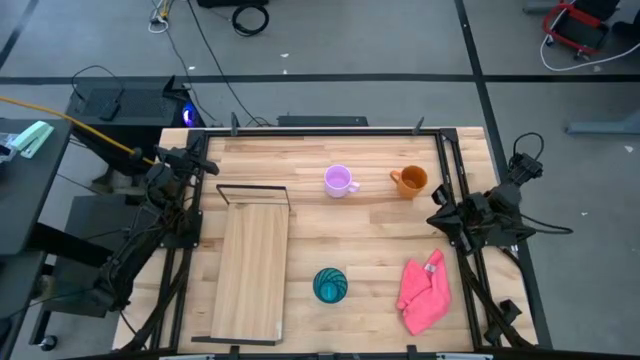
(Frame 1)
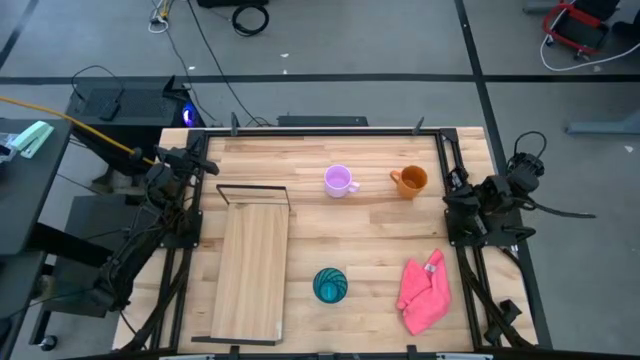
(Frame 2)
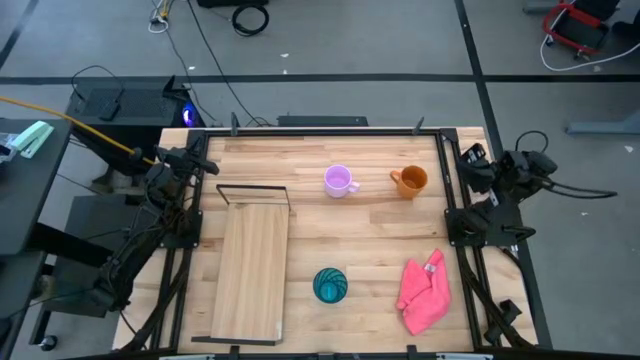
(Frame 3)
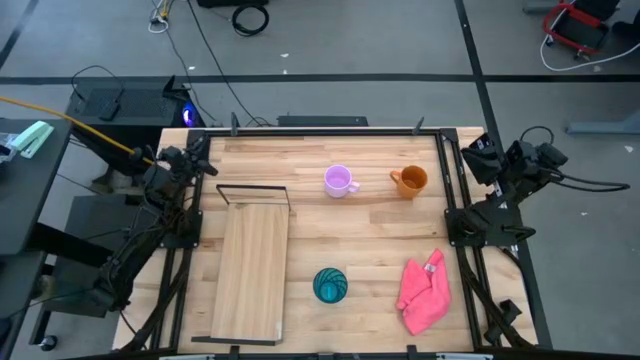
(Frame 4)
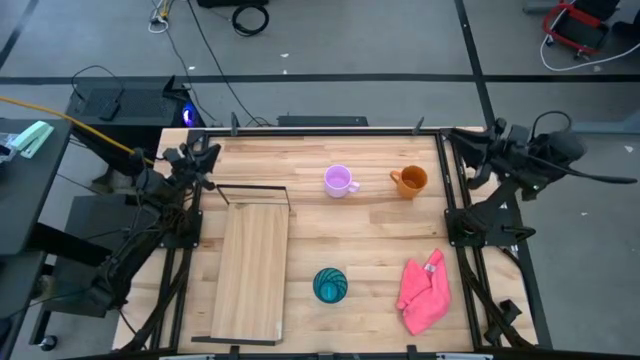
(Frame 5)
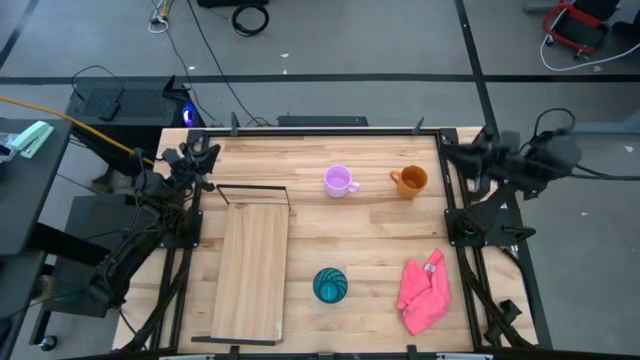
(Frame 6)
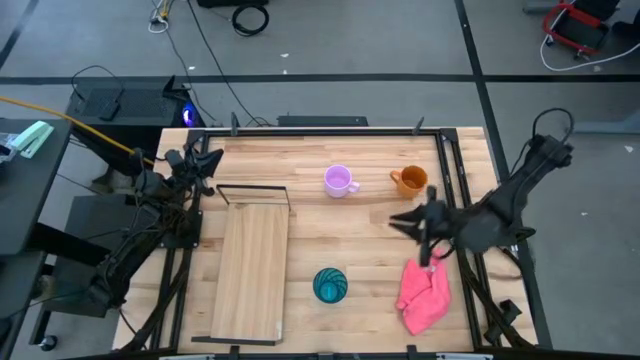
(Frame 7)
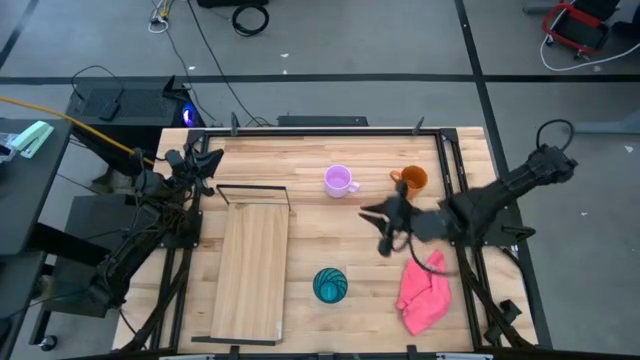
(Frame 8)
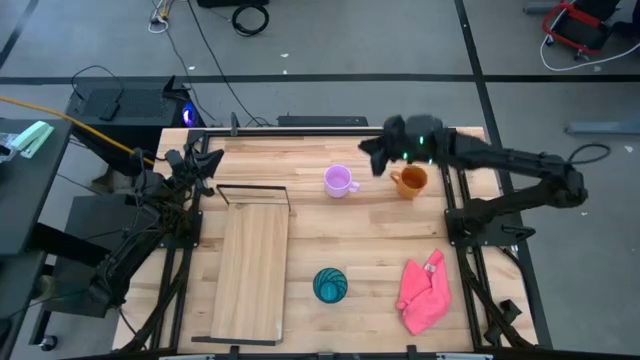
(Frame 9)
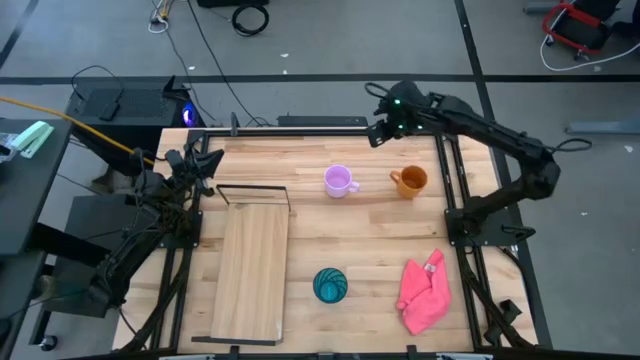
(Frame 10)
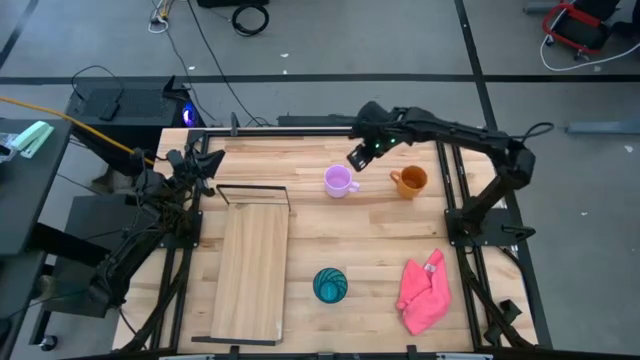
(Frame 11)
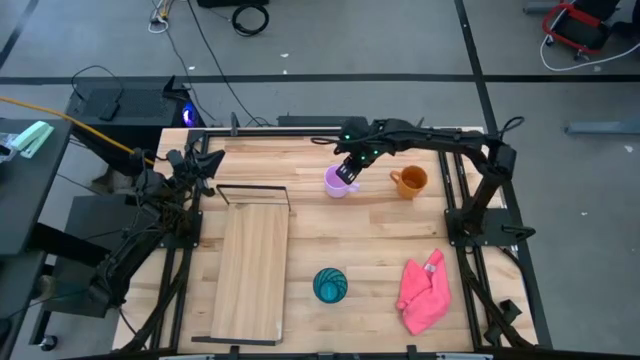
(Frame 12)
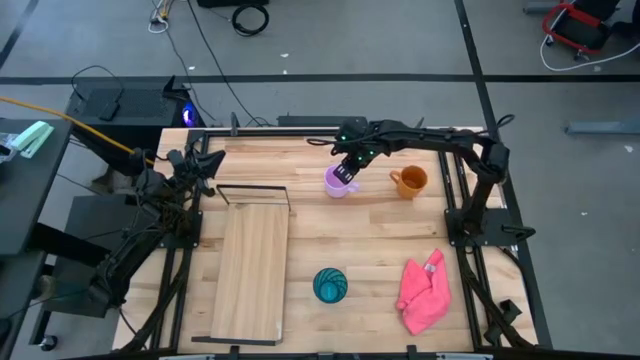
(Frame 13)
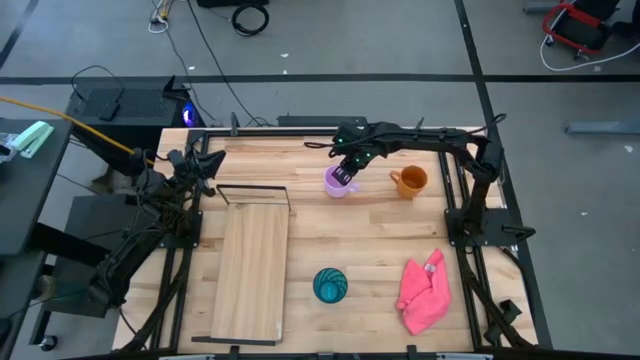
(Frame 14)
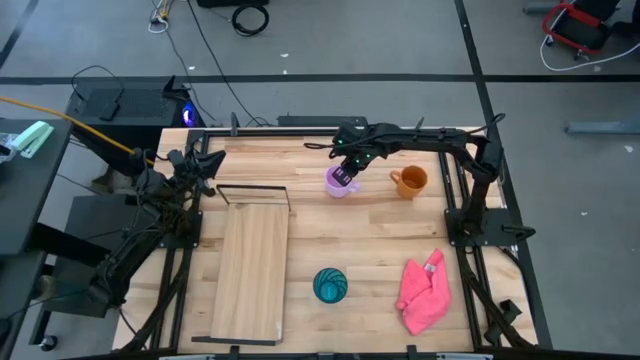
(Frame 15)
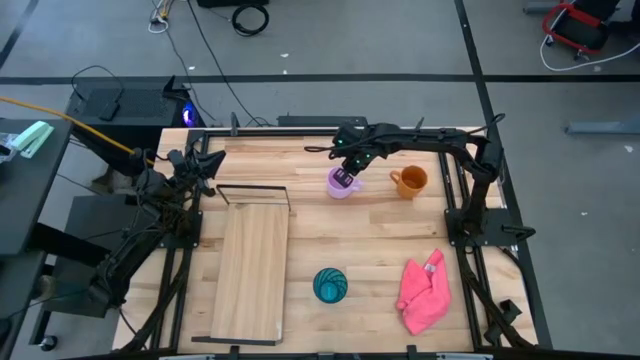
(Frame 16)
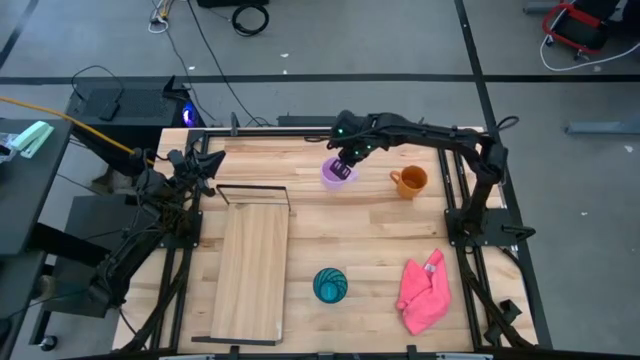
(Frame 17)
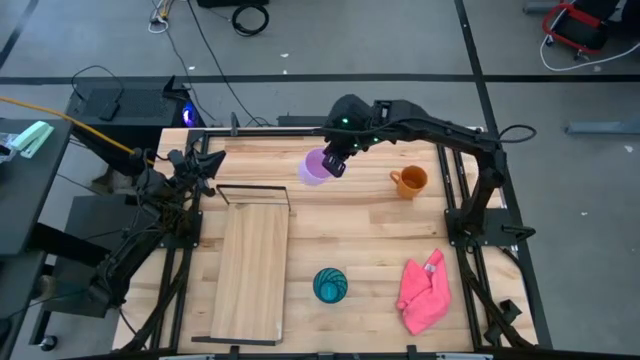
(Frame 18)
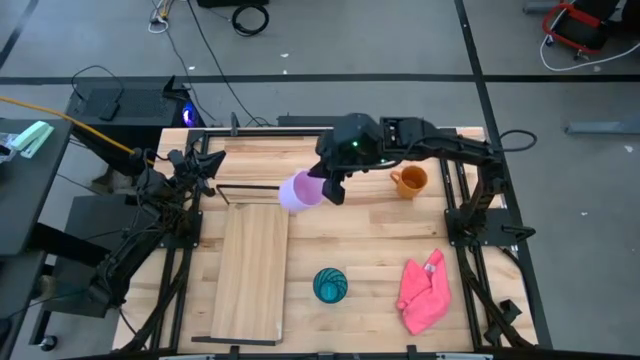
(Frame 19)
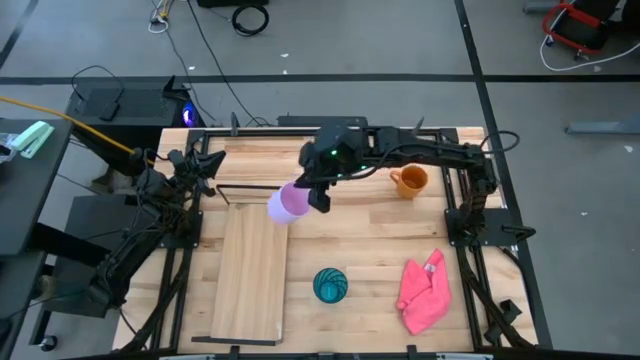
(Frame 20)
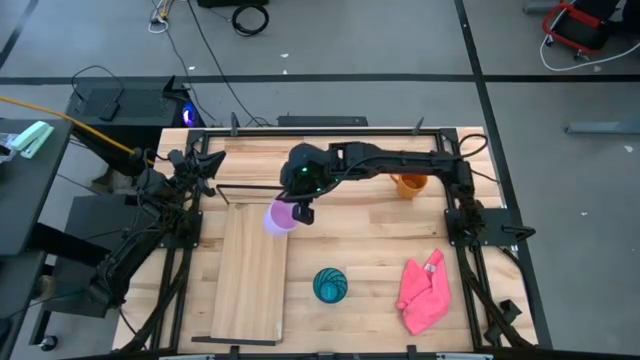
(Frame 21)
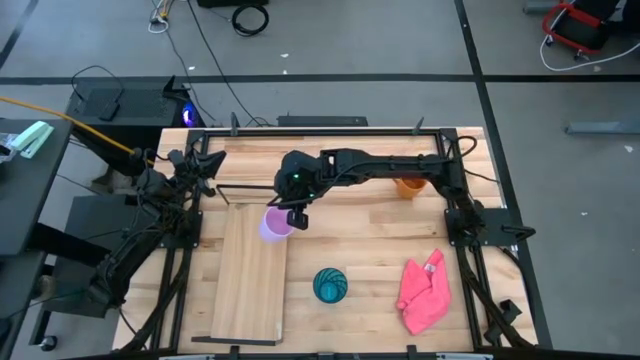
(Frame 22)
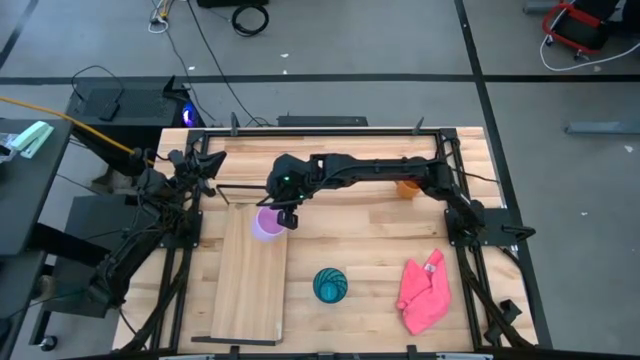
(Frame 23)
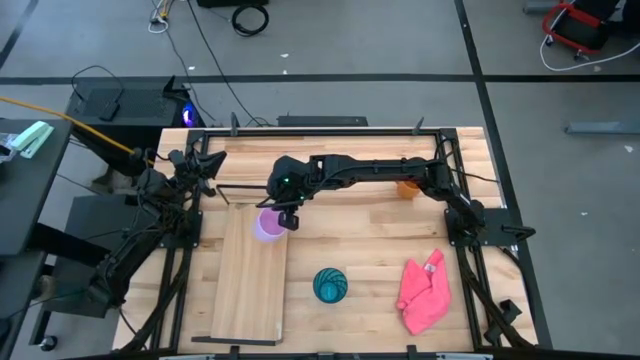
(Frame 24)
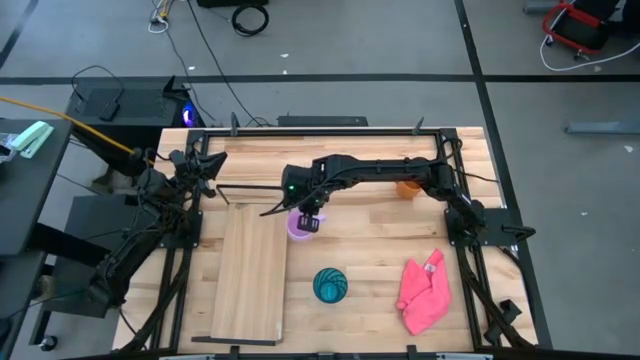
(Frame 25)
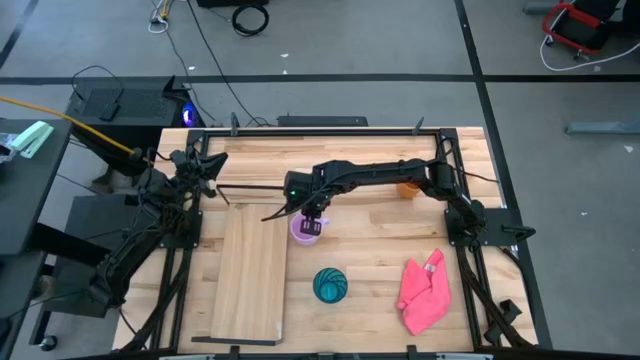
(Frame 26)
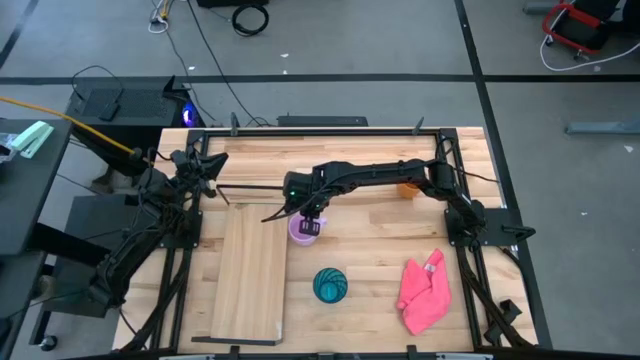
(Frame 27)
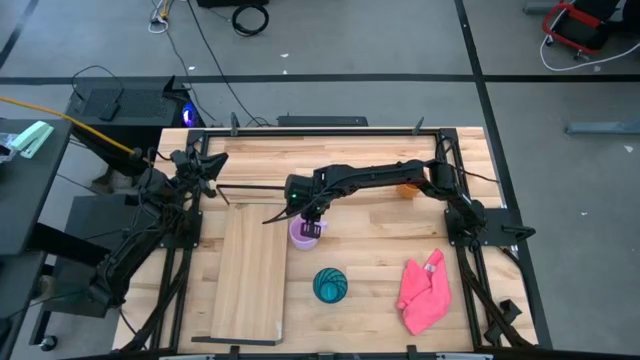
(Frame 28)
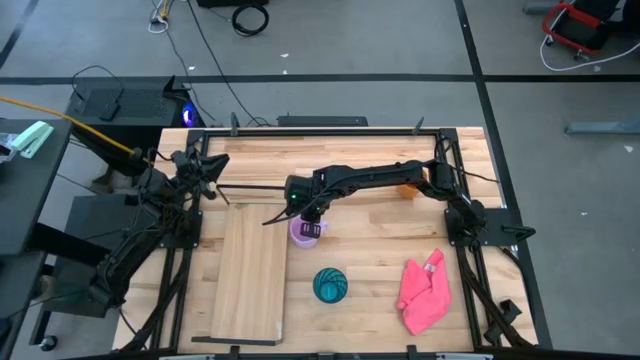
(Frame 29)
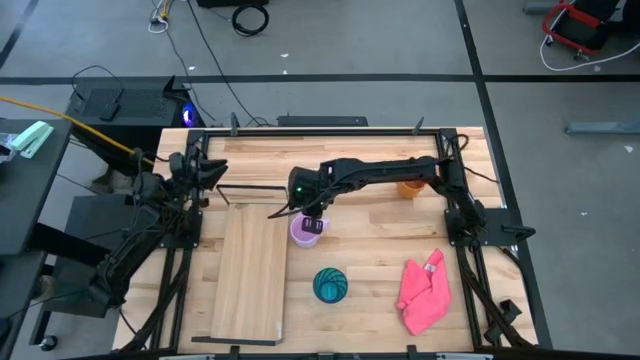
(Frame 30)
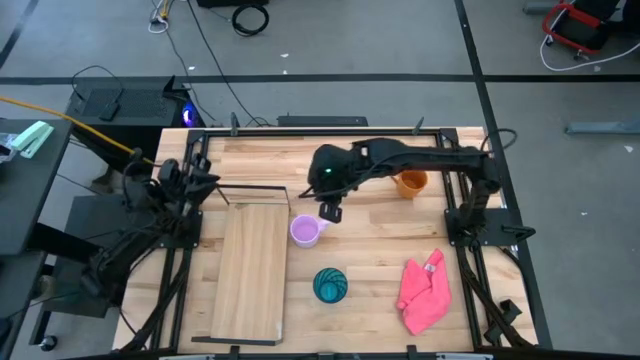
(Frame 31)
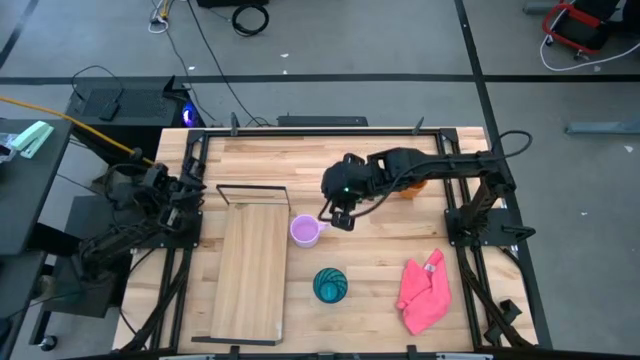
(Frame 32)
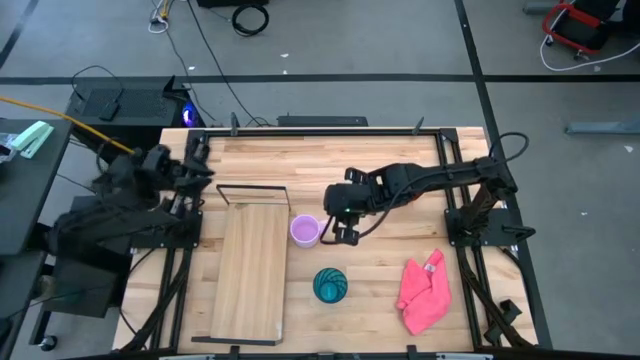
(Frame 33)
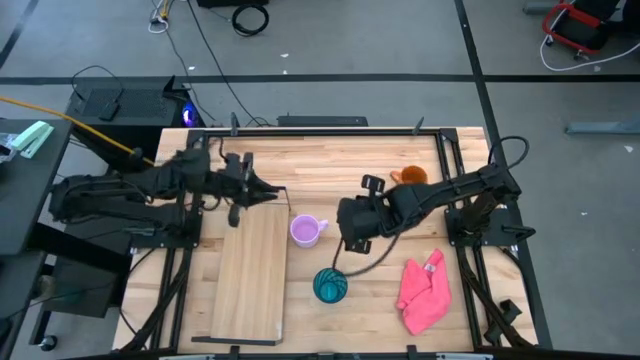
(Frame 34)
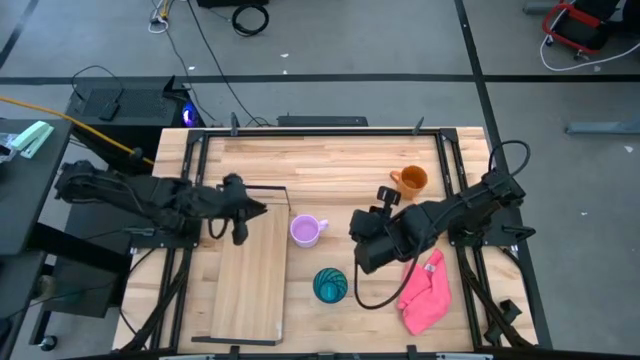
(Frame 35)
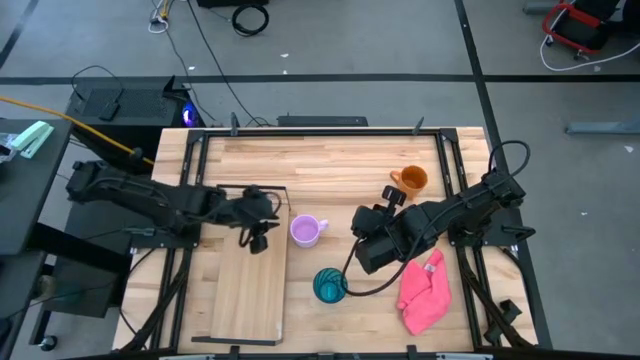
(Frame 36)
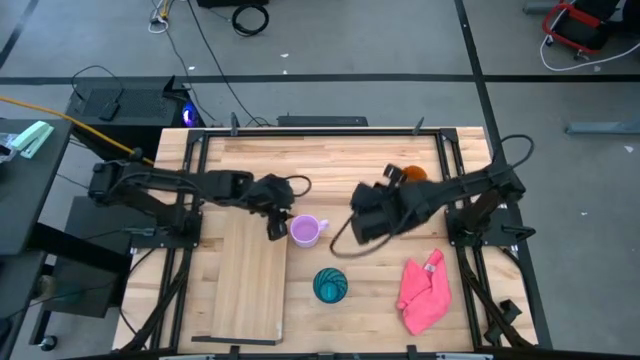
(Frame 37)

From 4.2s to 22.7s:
Task: Stack small to large cups/mugs on shelf
Put the purple mug on the shelf
